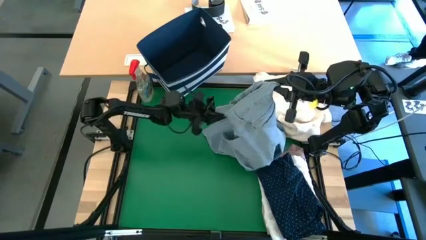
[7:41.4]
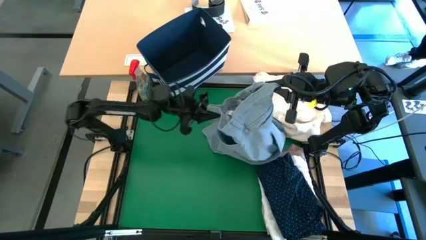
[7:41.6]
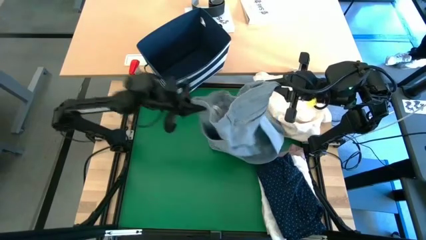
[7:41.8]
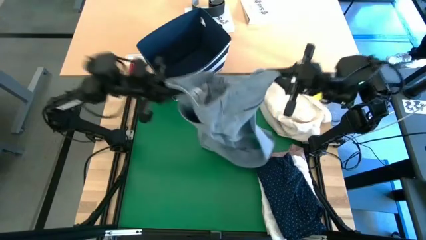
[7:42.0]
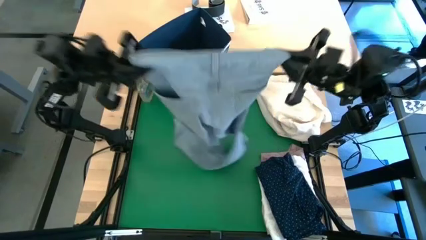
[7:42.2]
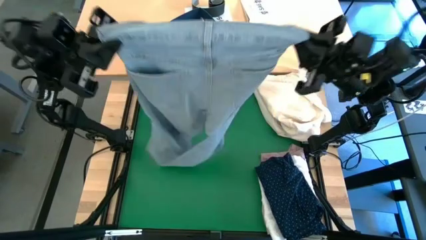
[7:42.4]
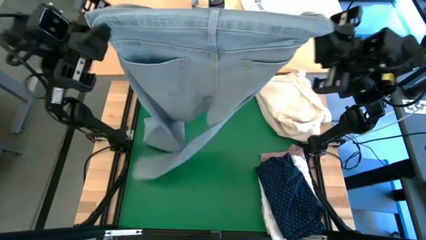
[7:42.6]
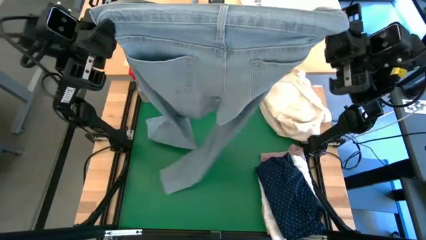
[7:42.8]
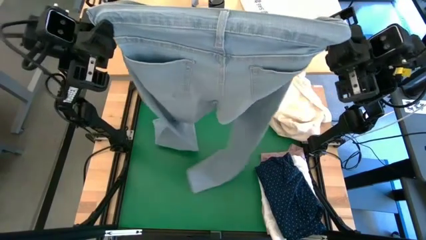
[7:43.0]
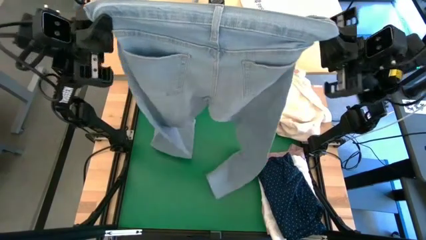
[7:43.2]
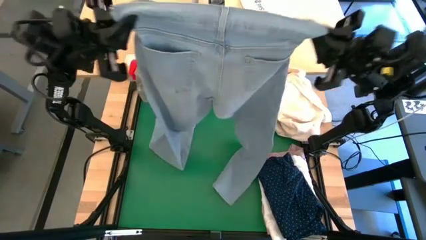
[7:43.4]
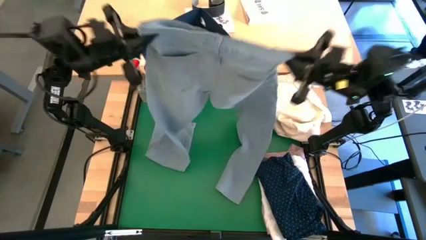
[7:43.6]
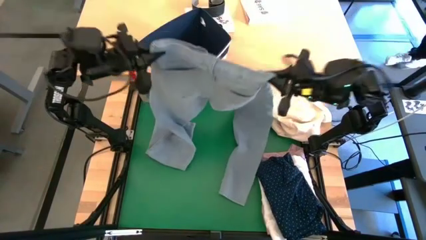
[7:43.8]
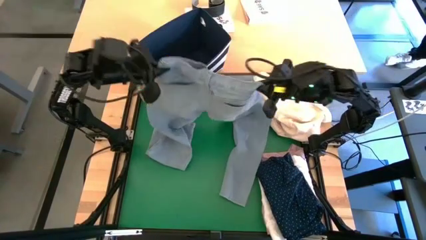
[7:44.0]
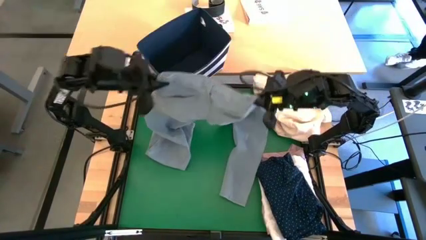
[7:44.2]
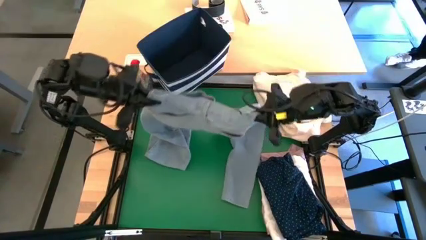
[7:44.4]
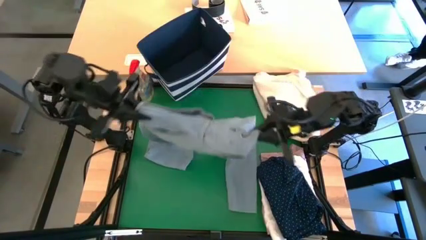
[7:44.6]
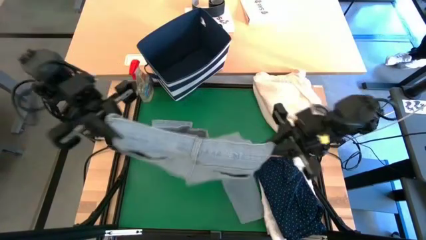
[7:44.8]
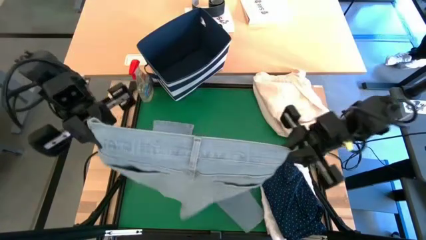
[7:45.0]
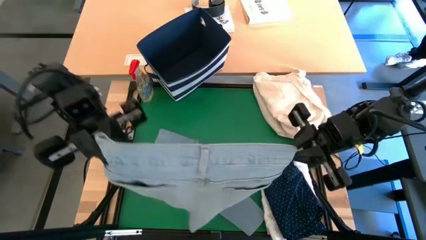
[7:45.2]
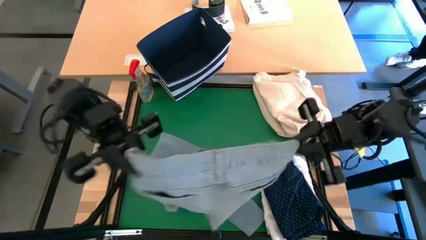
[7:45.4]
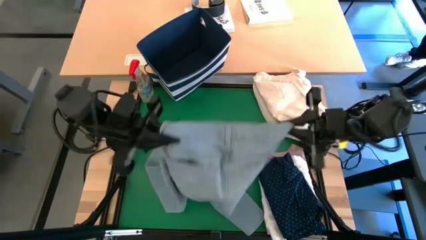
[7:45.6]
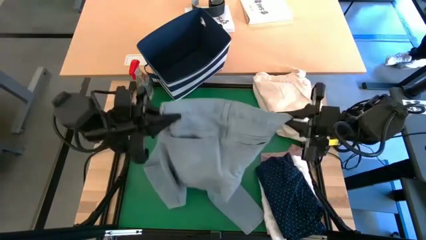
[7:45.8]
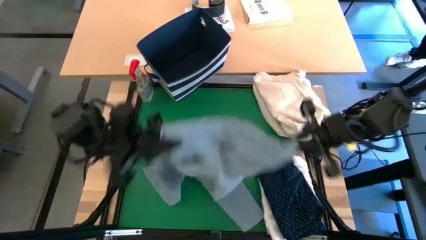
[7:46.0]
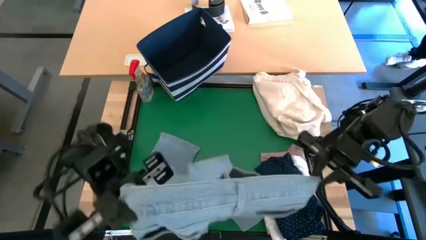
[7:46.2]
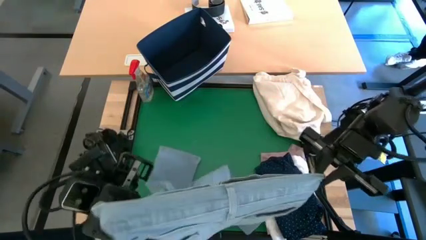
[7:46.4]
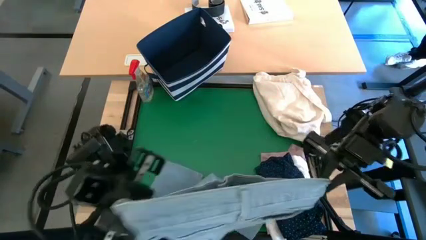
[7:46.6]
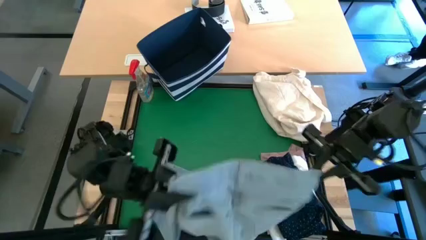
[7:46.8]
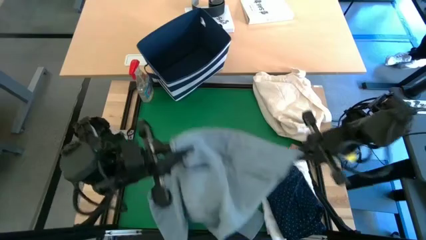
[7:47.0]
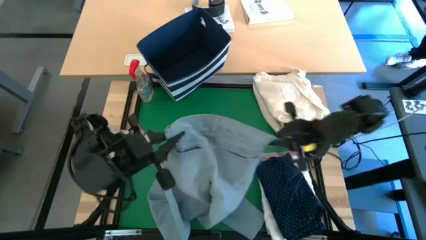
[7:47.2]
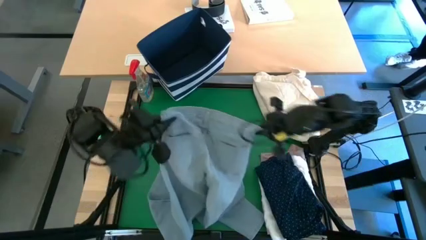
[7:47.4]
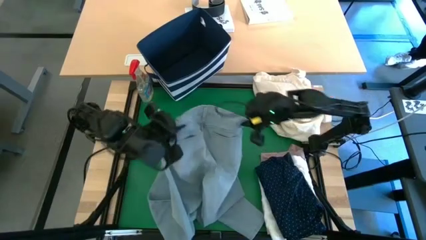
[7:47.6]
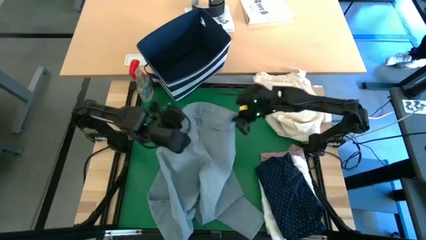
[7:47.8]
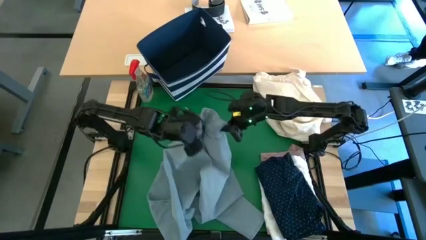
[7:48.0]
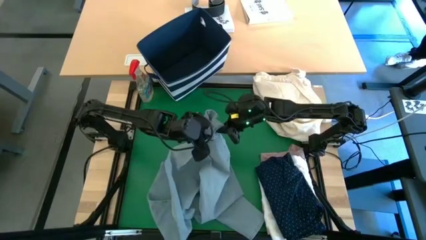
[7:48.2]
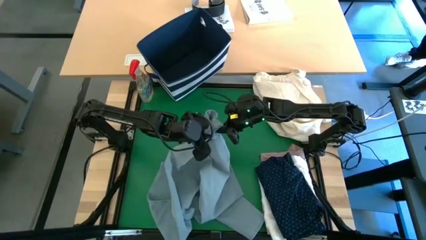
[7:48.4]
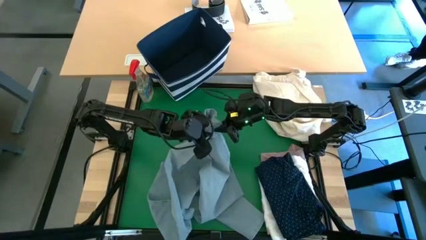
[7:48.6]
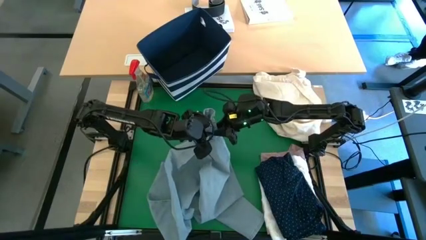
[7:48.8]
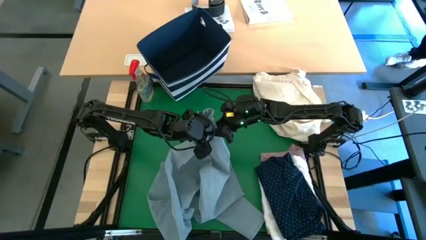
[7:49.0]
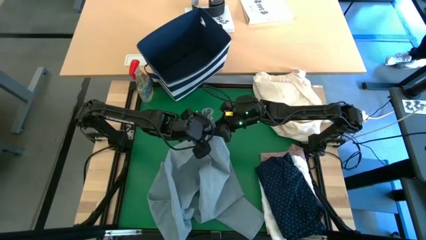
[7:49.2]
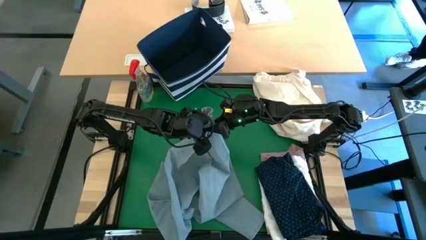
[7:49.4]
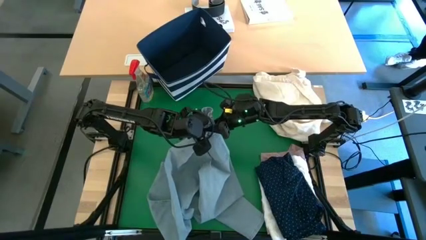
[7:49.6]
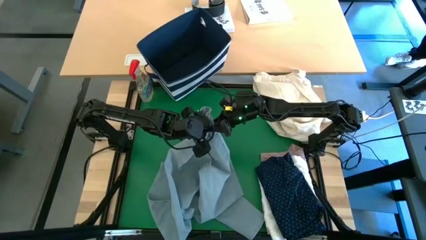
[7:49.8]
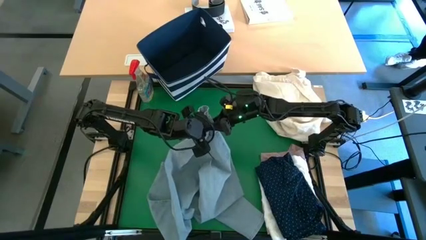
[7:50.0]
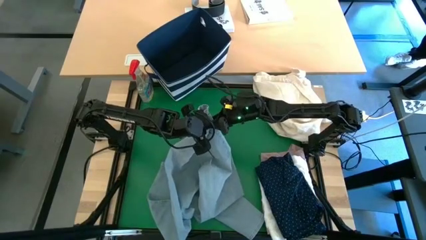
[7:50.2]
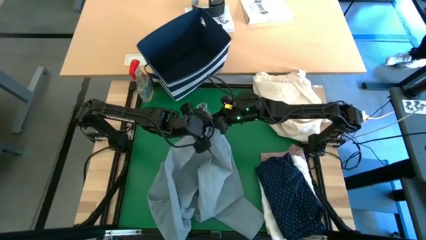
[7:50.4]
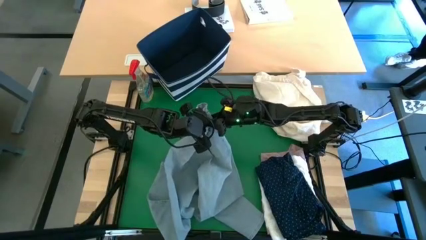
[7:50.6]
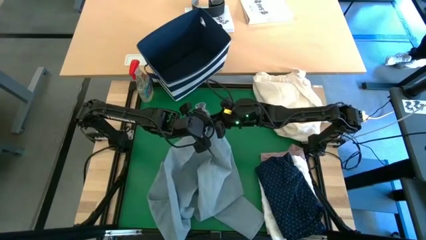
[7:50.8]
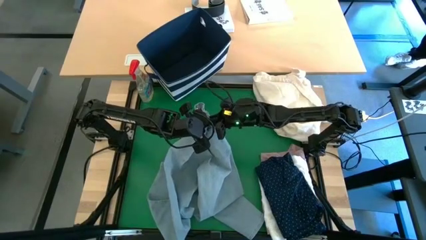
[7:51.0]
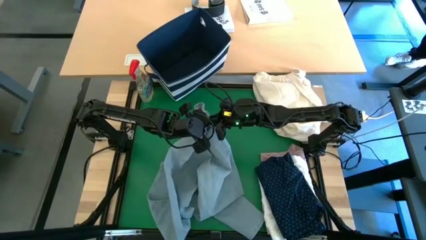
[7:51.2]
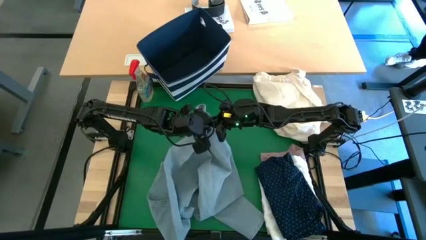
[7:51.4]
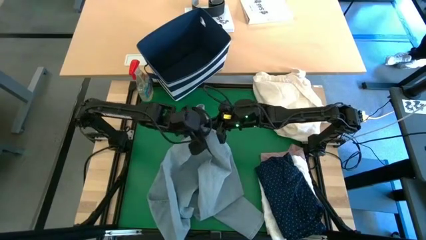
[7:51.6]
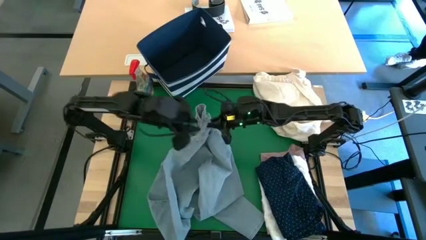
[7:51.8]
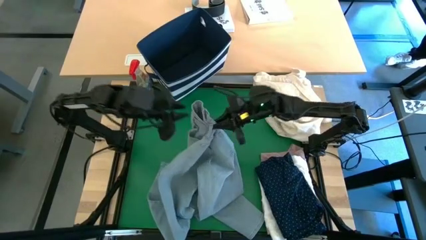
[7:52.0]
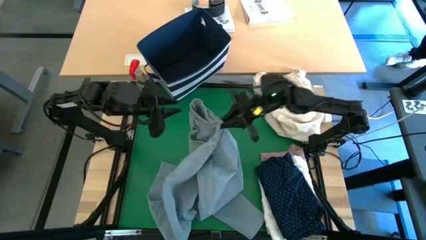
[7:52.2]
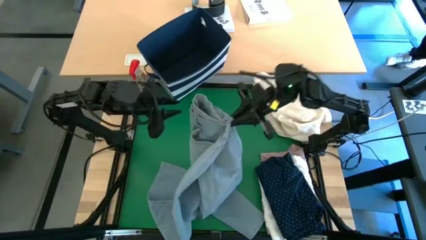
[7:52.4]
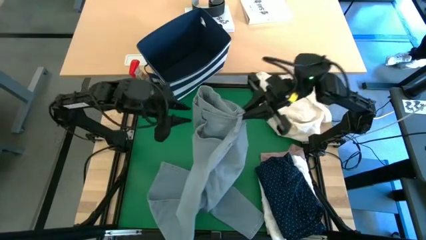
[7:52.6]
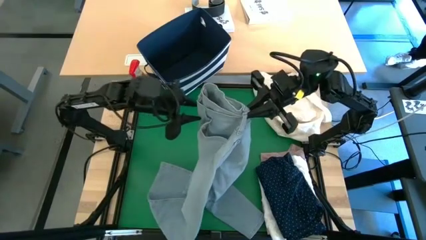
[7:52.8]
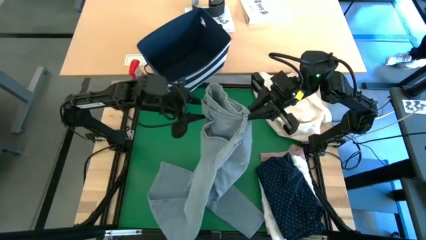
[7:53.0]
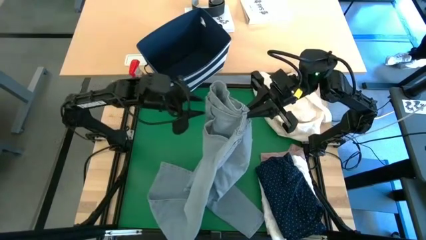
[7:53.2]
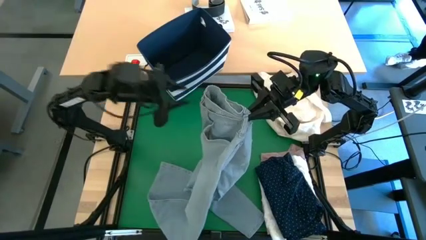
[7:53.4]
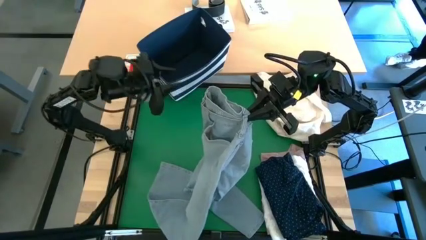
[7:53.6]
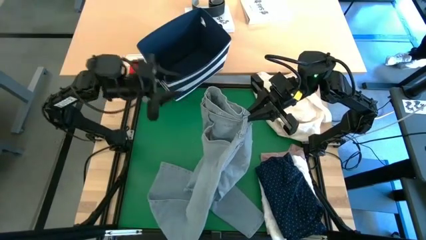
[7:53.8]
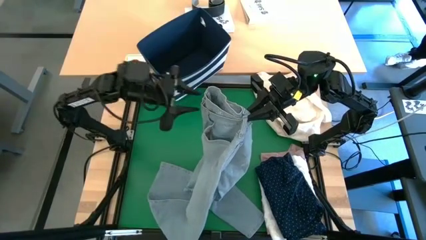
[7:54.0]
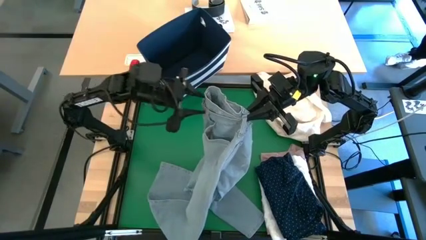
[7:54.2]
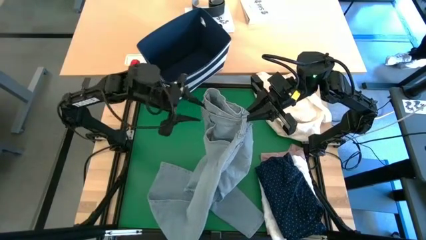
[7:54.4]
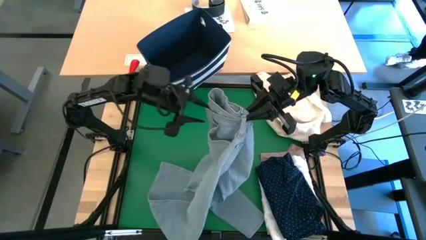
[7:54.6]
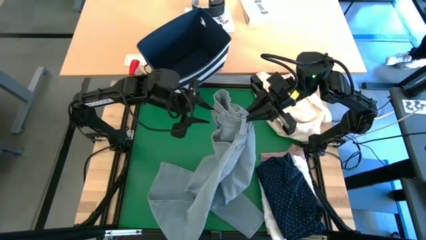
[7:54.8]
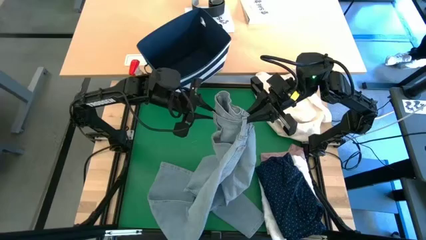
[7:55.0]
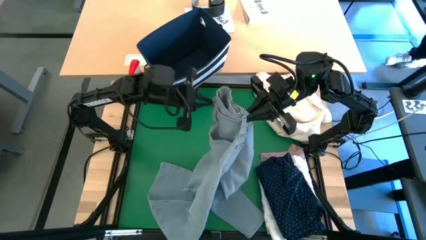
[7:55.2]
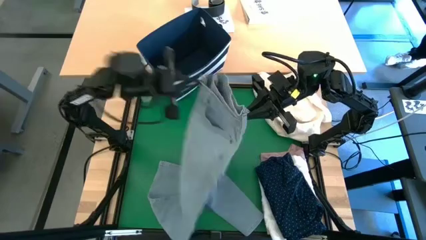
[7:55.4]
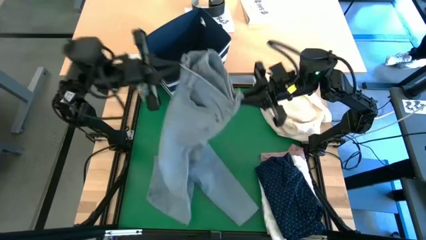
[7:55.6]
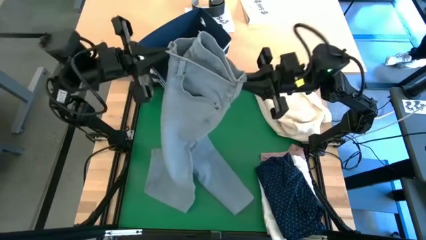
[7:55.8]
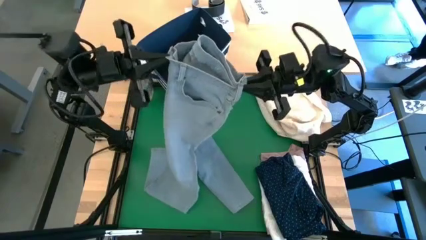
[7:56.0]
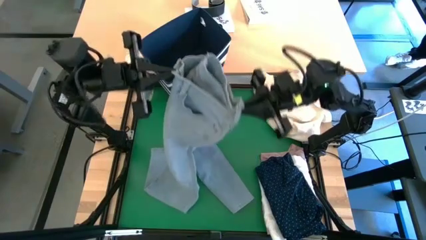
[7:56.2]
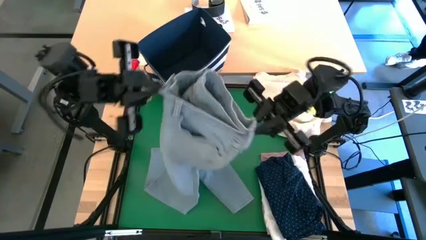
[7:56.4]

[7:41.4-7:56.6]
Task: Fold laundry
Fold the blue jeans
